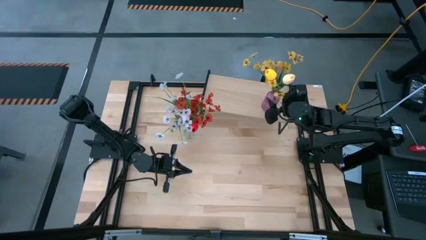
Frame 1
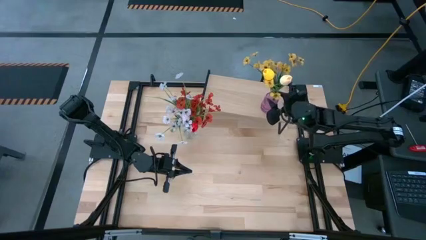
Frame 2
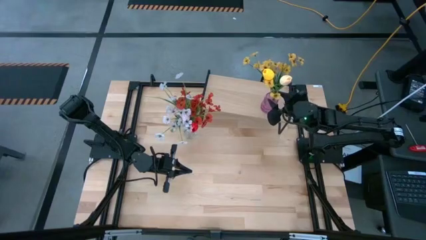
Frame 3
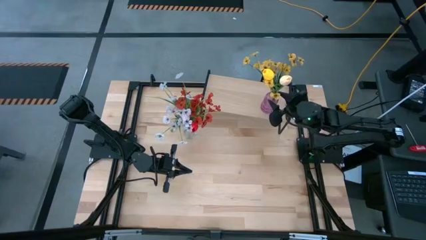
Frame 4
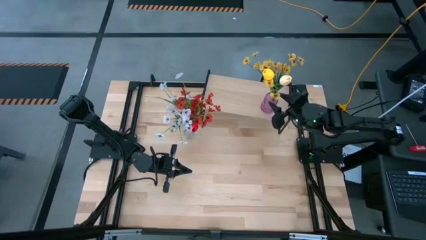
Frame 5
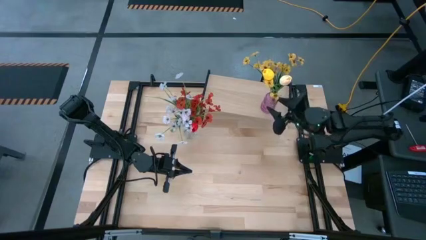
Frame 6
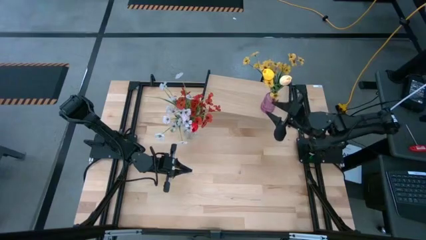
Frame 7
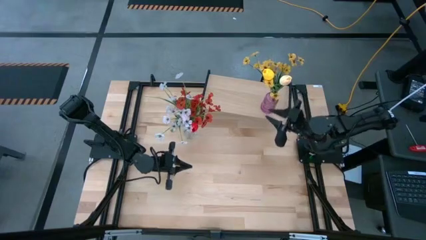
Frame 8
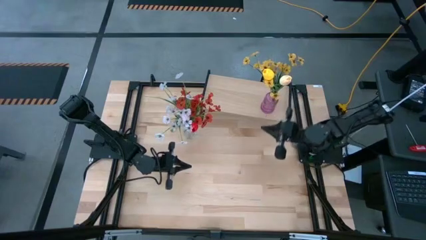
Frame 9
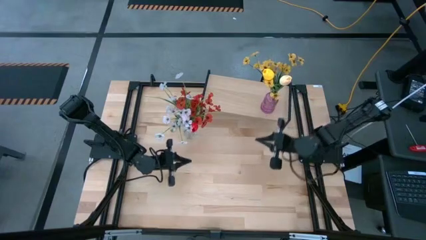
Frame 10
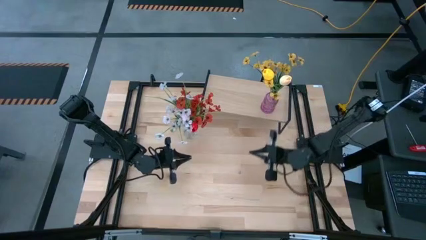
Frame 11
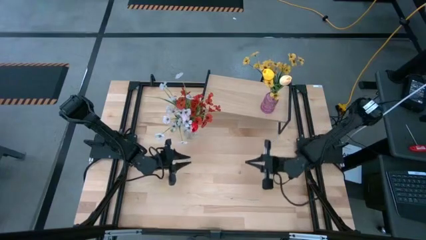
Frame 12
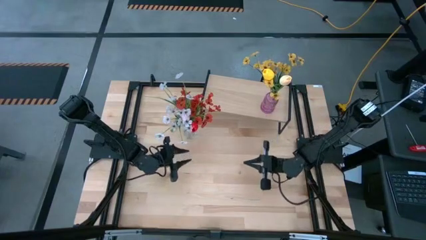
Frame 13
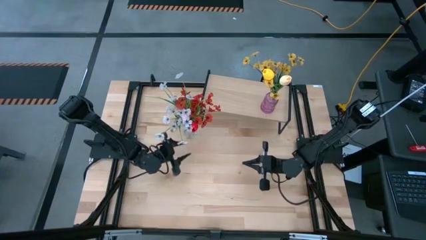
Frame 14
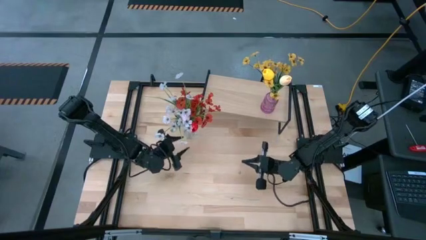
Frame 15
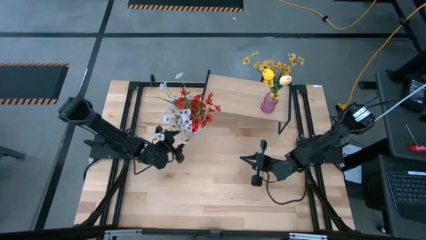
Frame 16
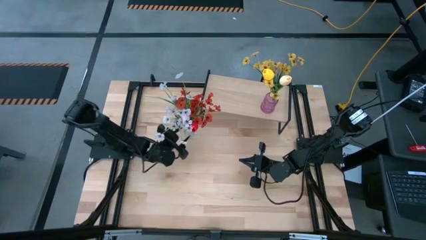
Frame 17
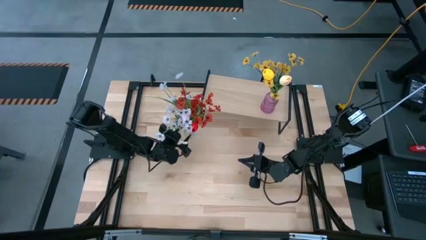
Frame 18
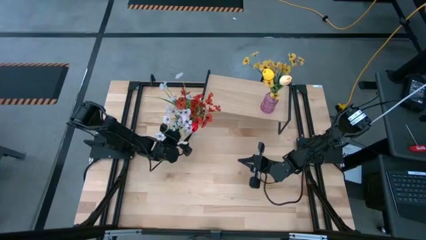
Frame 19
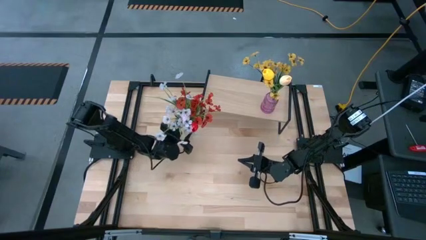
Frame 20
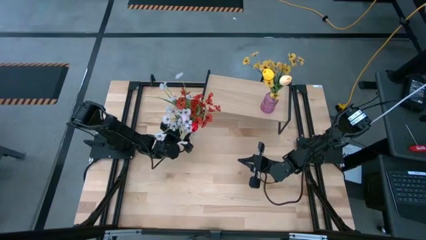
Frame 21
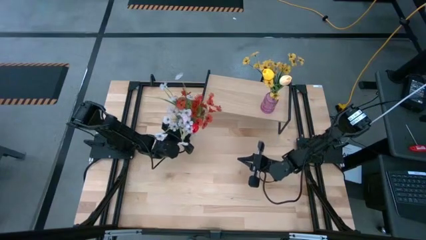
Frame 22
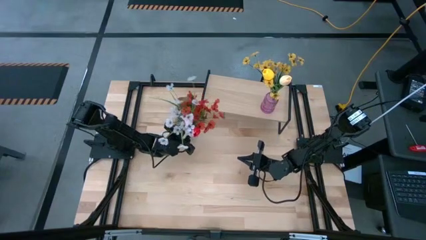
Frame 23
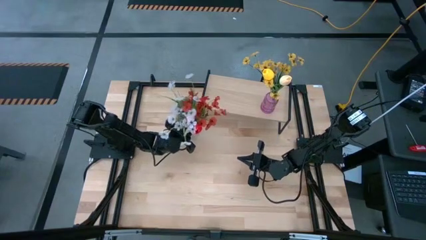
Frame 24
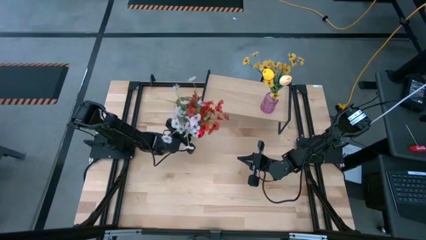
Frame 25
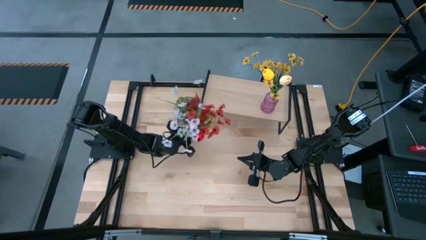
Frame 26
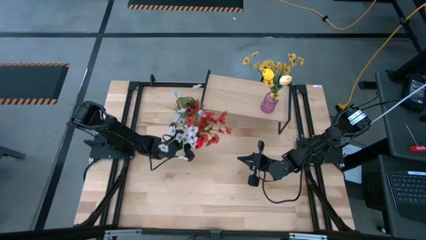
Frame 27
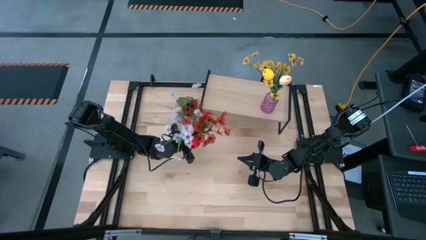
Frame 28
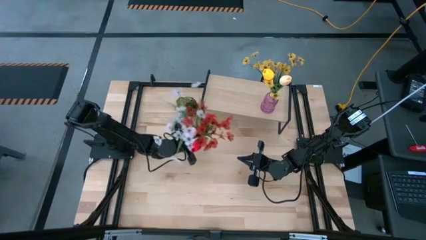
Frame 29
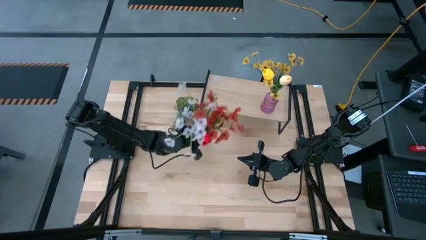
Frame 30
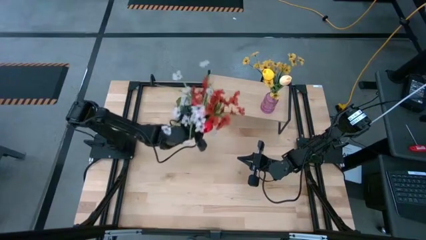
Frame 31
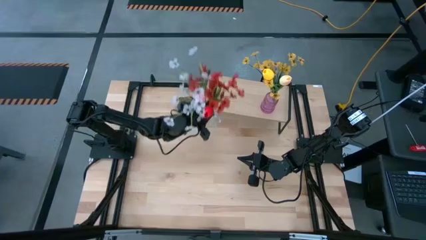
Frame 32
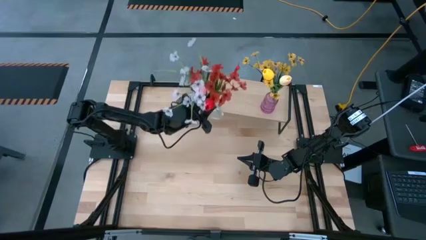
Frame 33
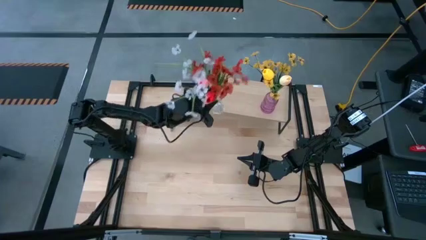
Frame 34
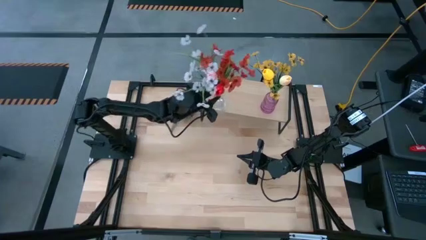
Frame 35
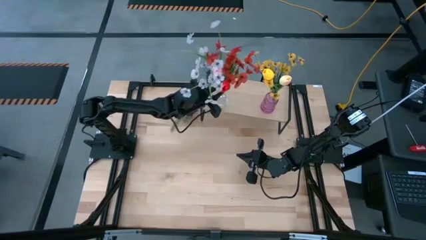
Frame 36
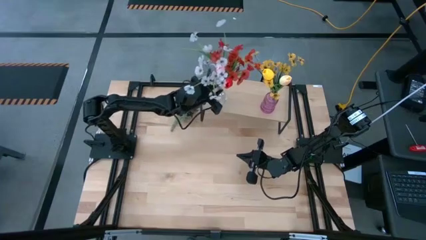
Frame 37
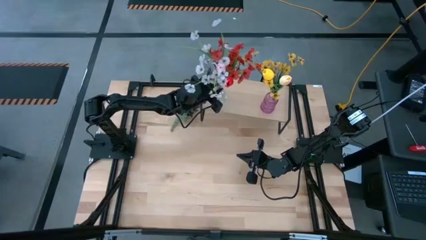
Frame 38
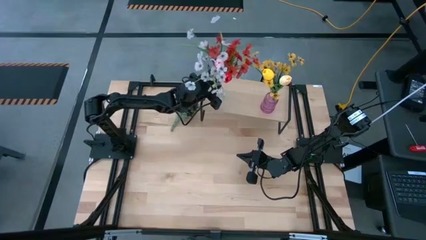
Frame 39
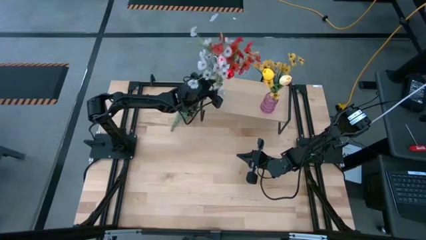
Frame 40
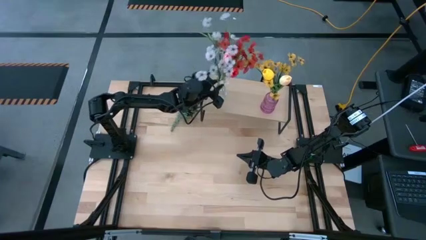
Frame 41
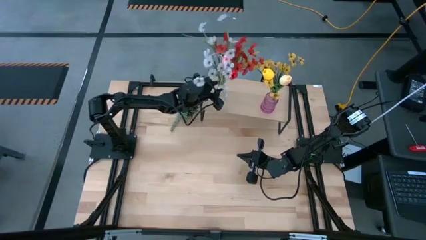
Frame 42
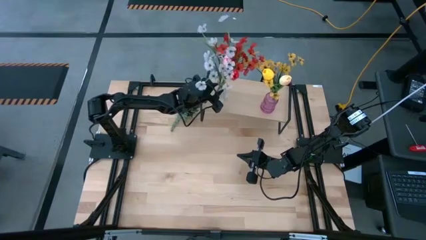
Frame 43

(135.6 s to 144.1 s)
Task: Pick and place flowers into a vace then onto a shelf
Put the transparent vase on the shelf

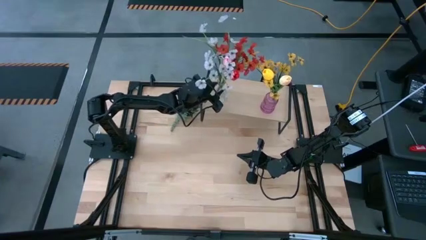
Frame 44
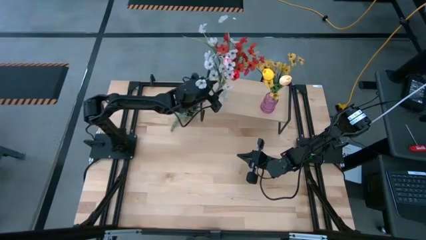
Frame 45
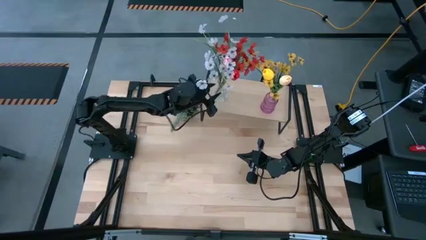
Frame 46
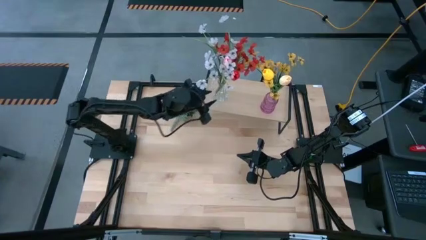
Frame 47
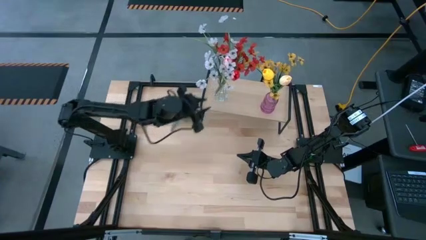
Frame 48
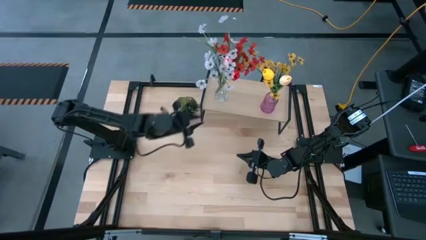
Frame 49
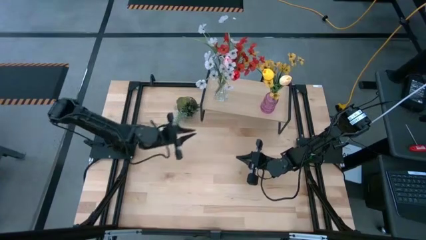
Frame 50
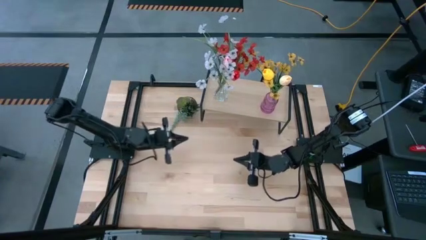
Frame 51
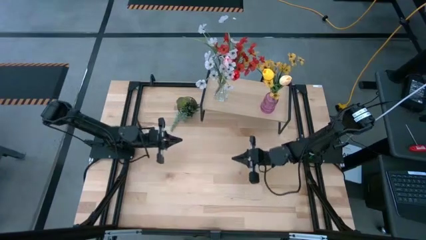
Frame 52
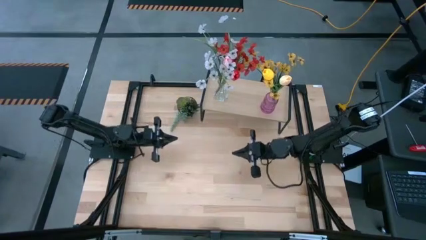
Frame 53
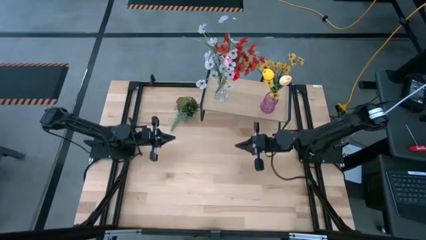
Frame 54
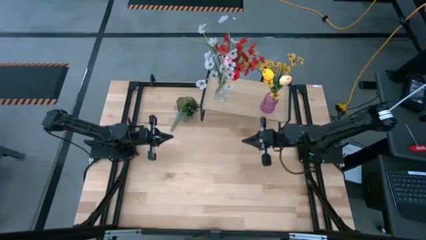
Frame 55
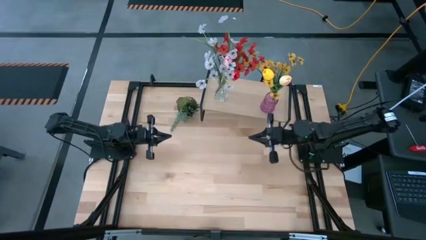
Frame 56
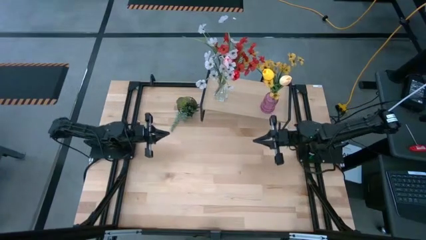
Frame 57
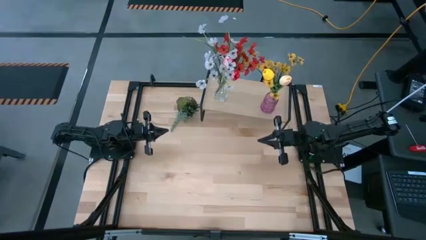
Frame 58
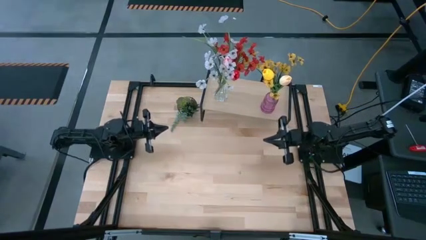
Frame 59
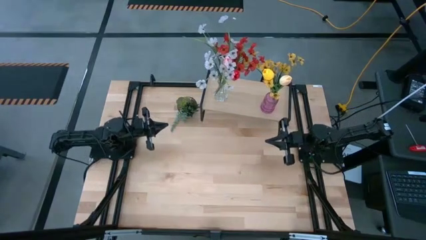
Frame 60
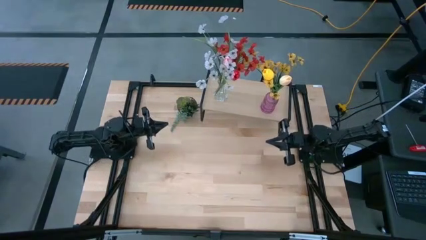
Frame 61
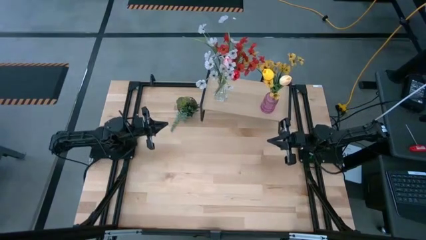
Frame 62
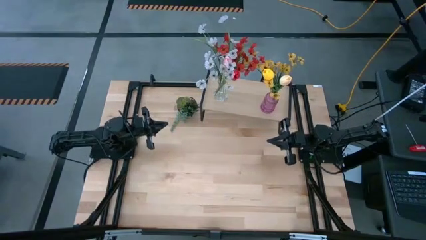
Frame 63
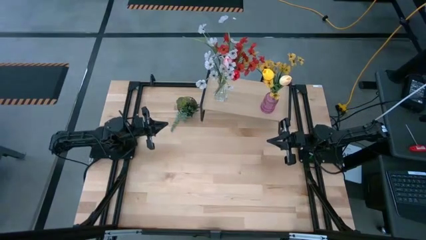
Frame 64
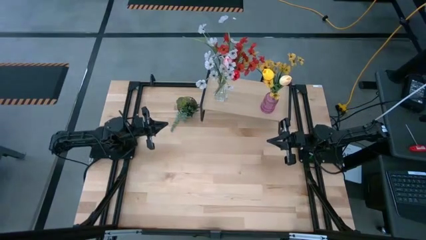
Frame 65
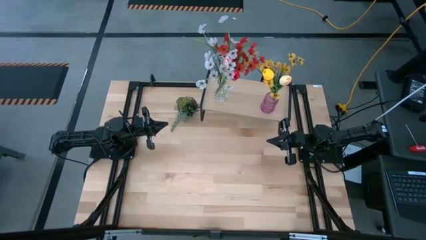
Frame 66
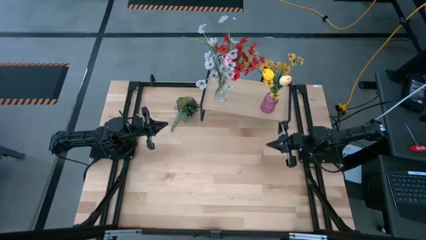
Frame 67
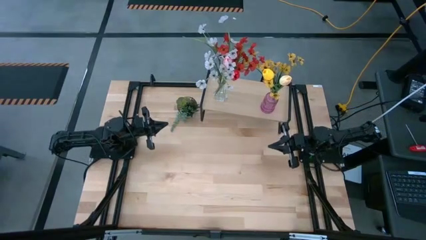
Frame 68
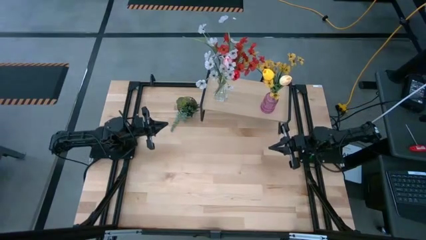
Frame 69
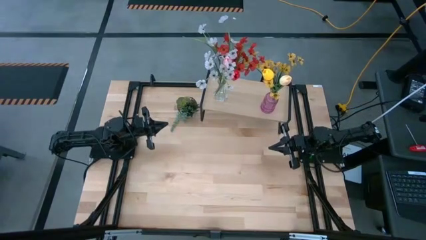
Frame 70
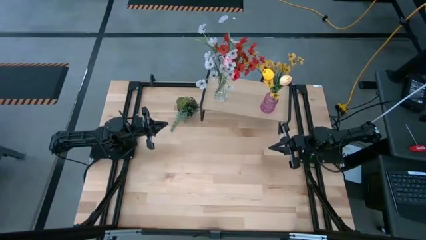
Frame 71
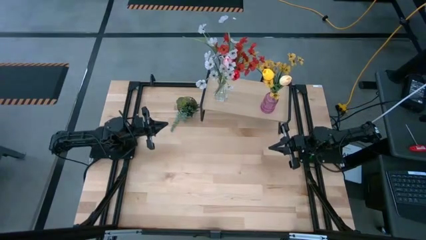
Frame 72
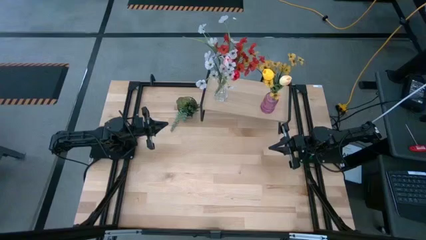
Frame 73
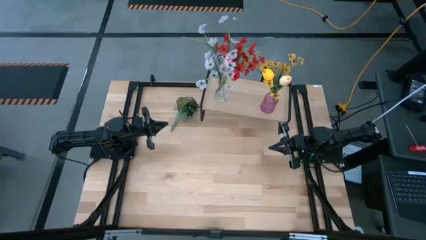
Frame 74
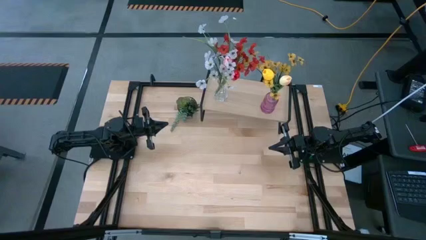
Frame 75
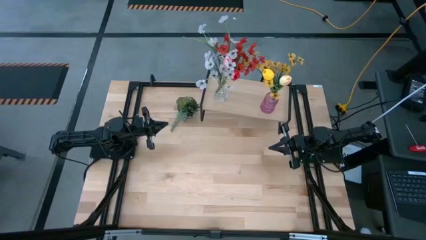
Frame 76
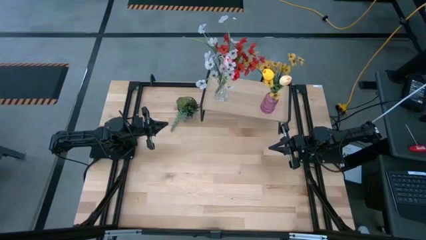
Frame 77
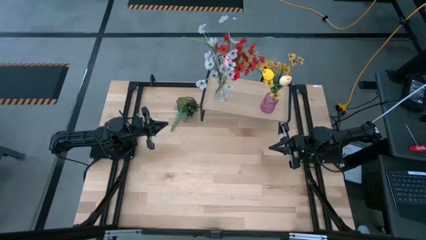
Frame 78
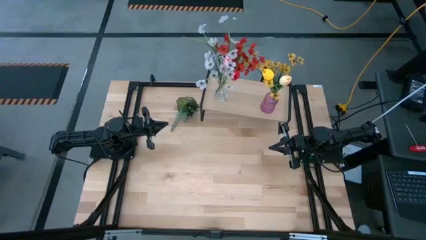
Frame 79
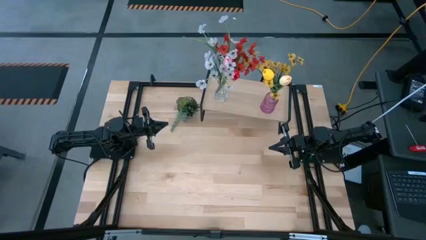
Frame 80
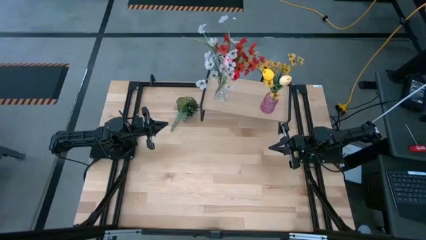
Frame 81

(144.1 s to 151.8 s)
Return to Home Position
